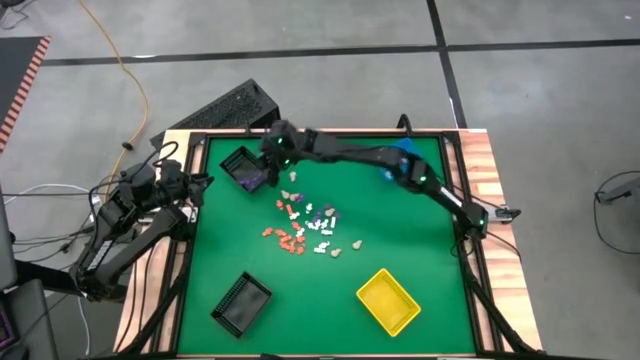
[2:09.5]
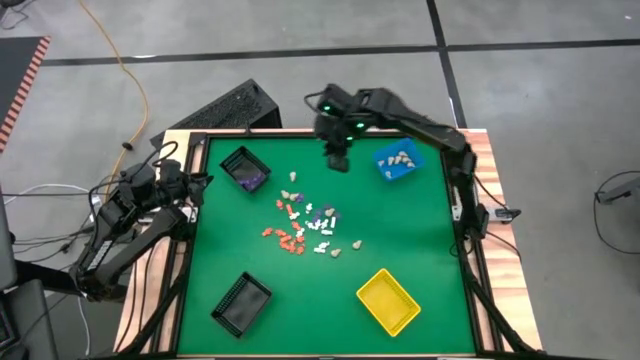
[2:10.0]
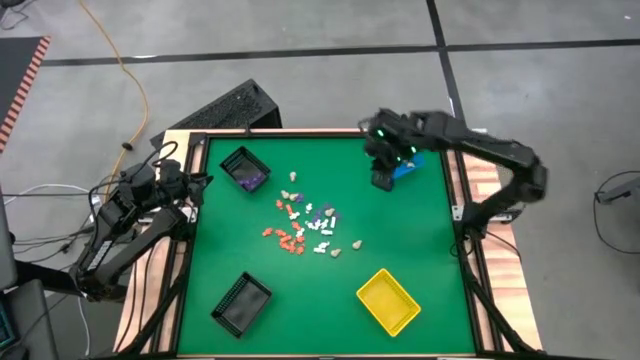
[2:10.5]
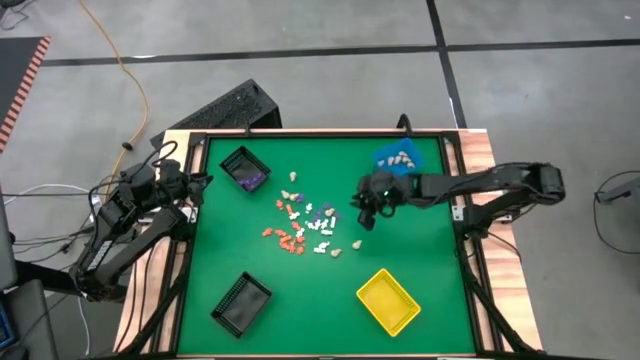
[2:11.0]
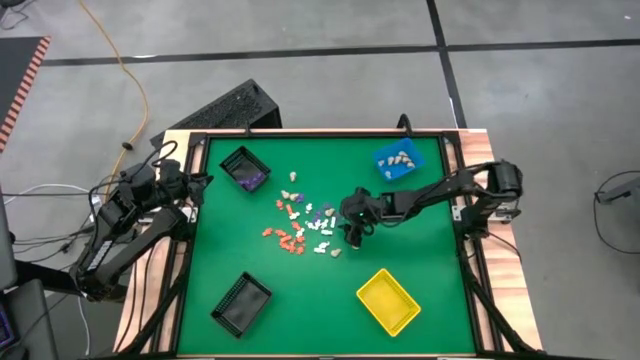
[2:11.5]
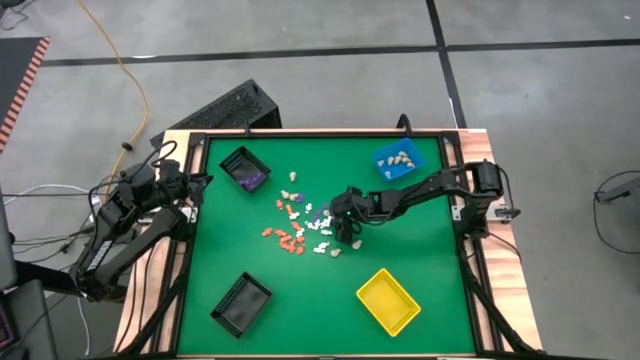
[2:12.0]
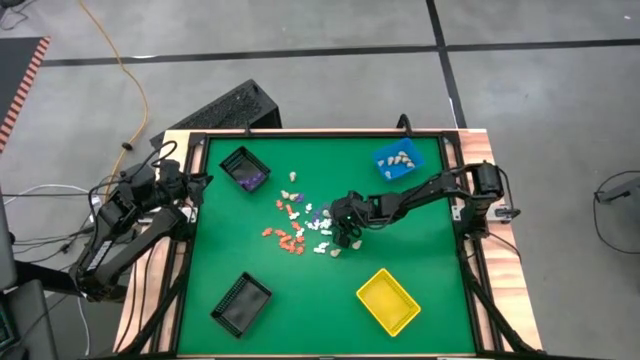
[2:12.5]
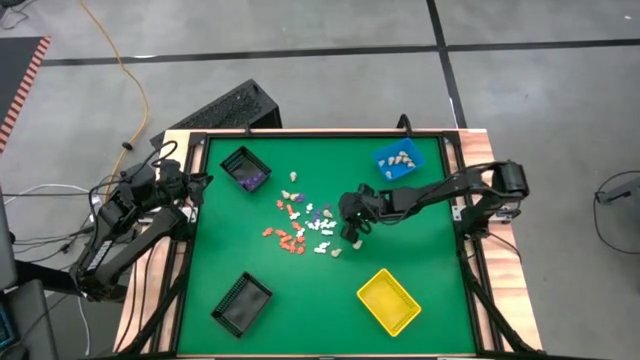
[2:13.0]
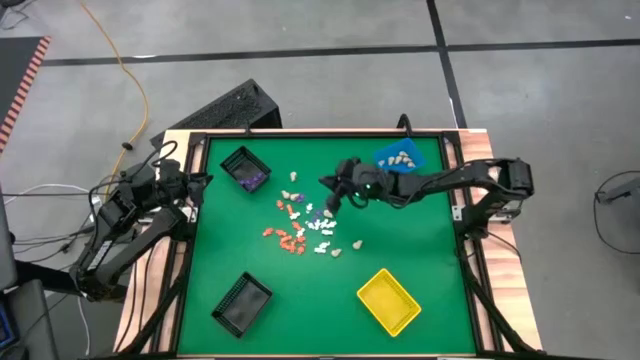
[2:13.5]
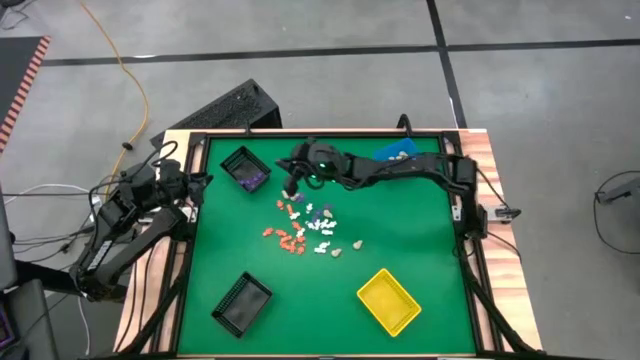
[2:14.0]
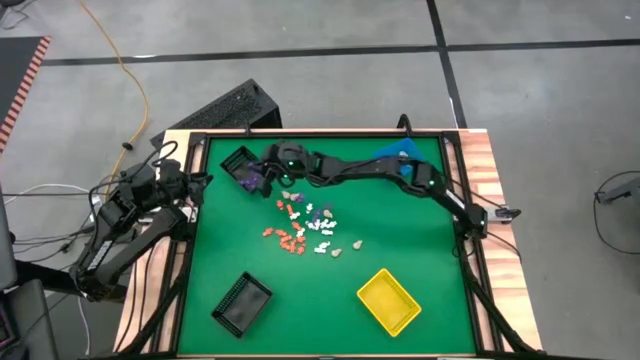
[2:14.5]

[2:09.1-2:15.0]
Task: Sort Halloween decoration
Put the purple spider toy into the top black basket

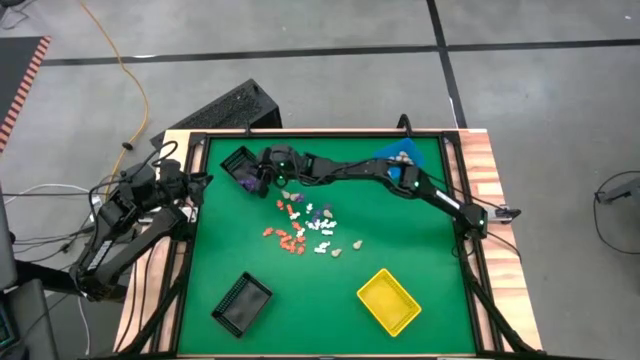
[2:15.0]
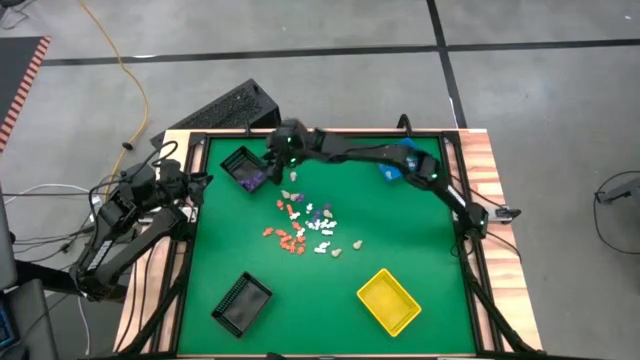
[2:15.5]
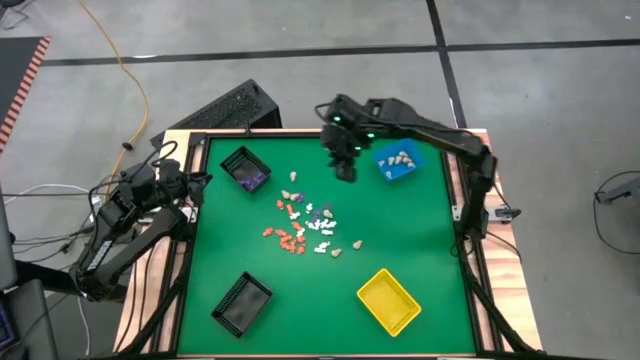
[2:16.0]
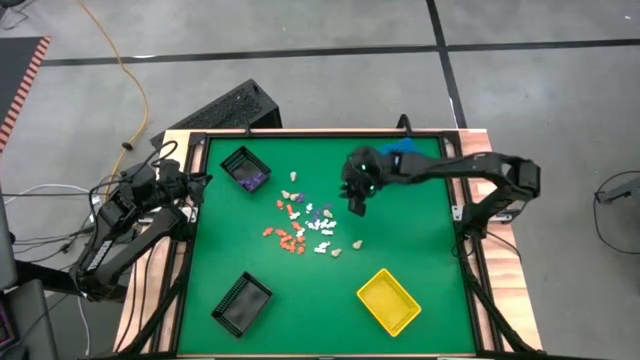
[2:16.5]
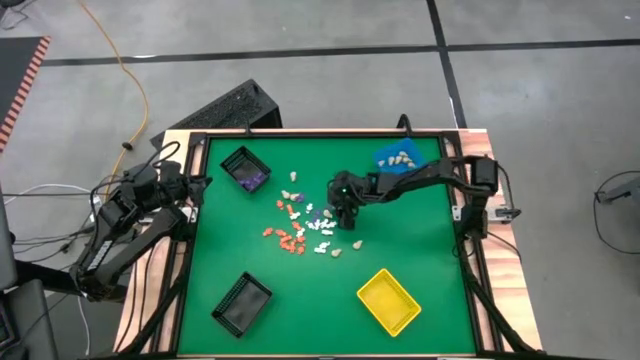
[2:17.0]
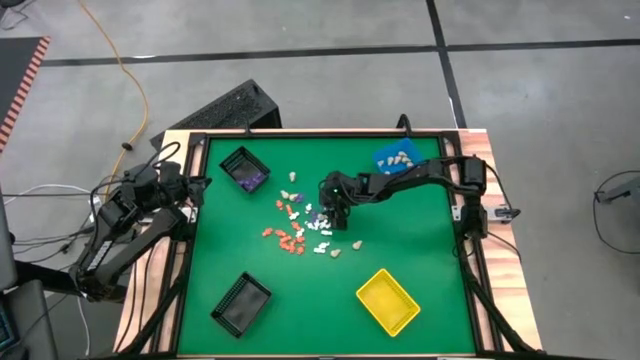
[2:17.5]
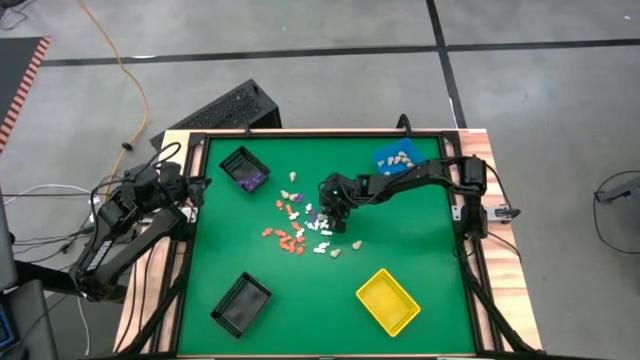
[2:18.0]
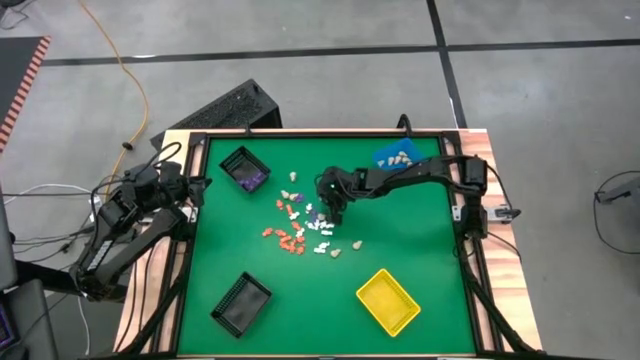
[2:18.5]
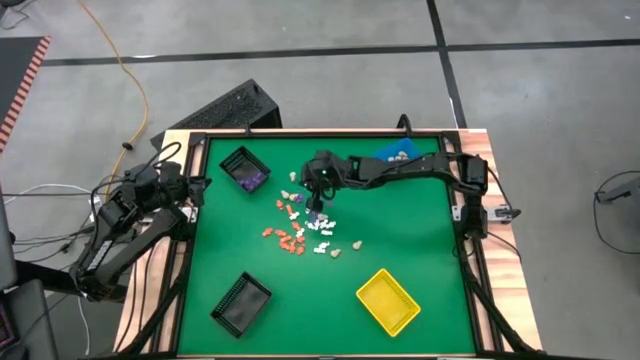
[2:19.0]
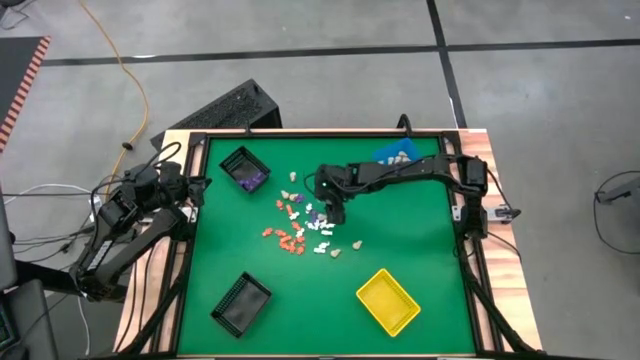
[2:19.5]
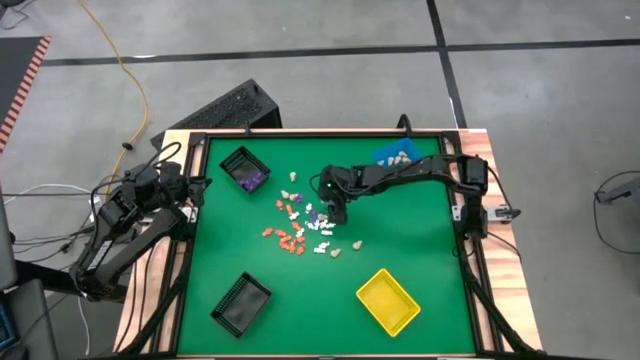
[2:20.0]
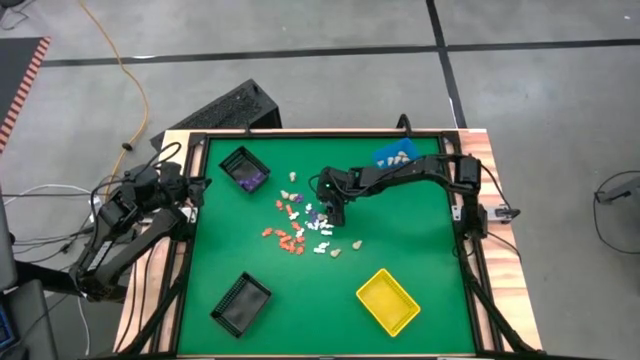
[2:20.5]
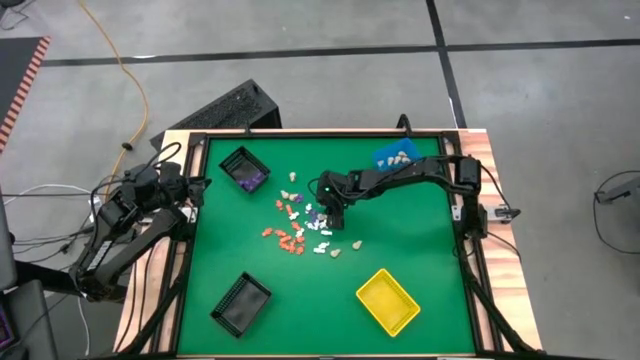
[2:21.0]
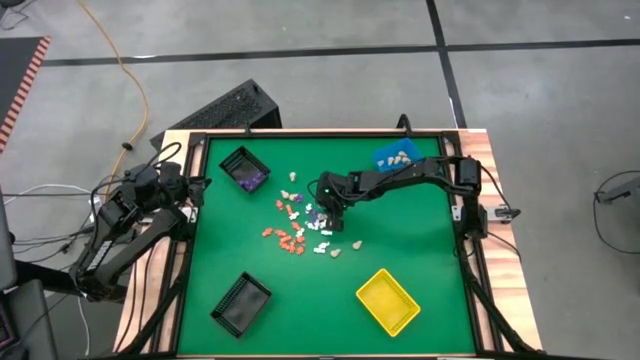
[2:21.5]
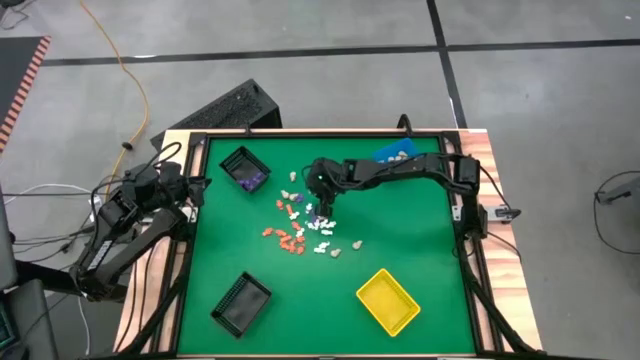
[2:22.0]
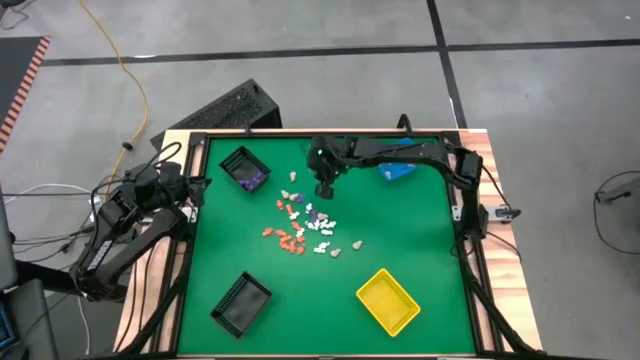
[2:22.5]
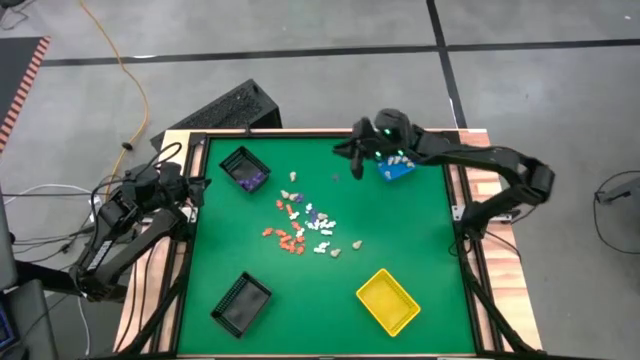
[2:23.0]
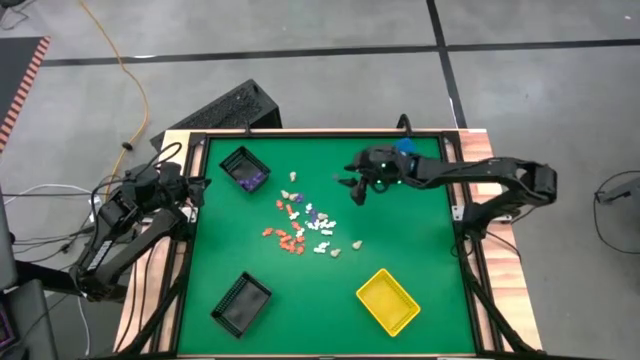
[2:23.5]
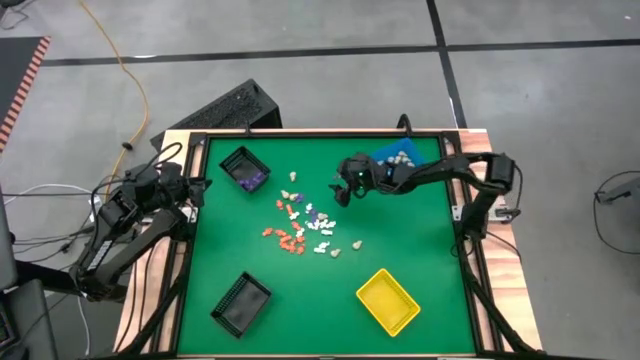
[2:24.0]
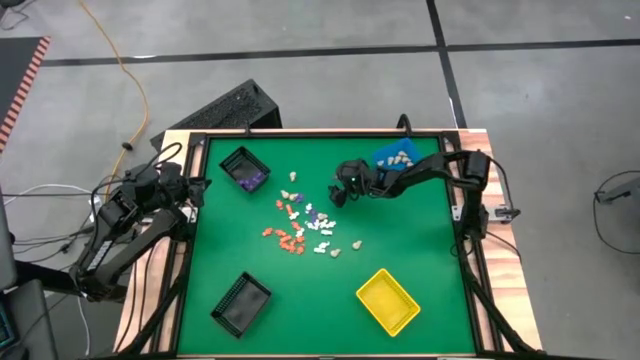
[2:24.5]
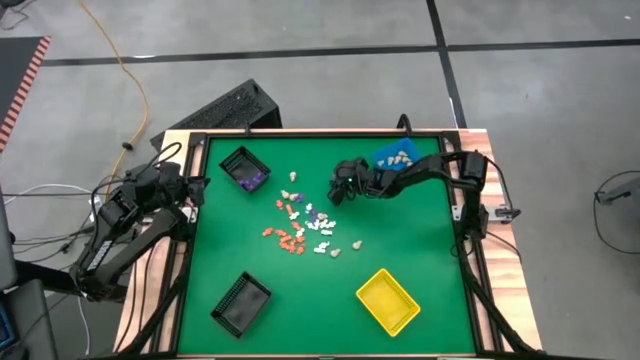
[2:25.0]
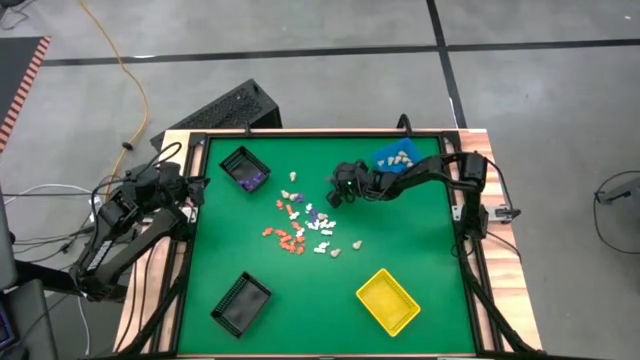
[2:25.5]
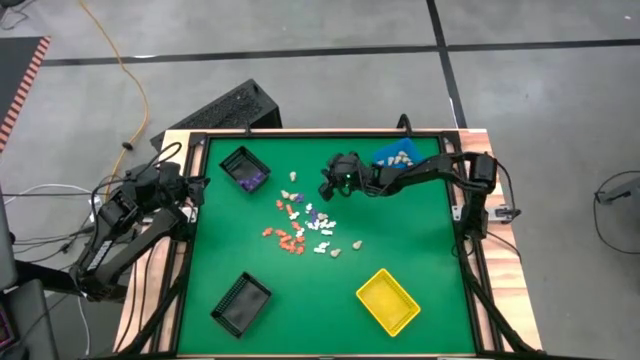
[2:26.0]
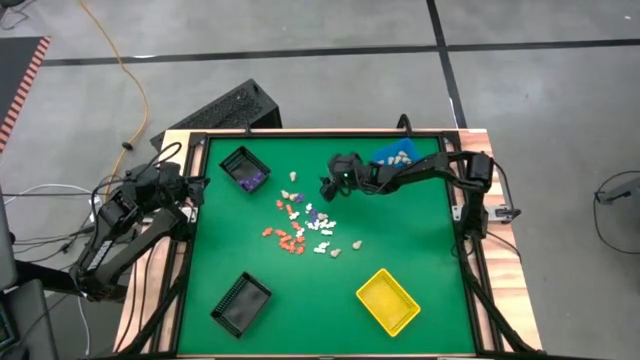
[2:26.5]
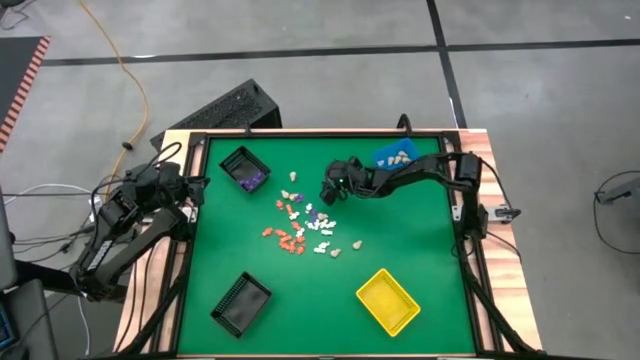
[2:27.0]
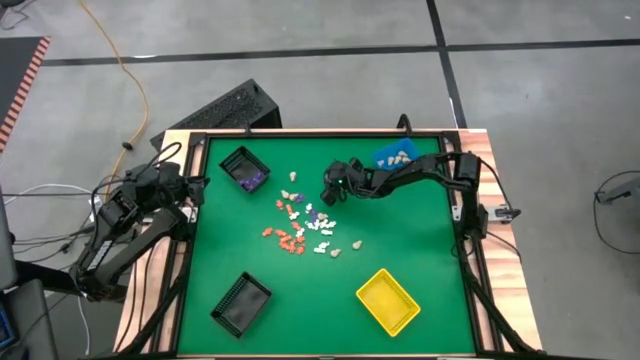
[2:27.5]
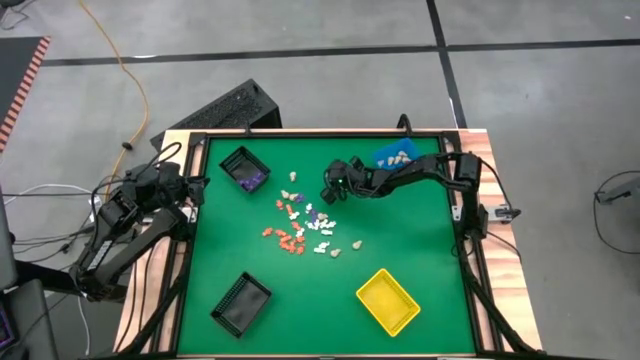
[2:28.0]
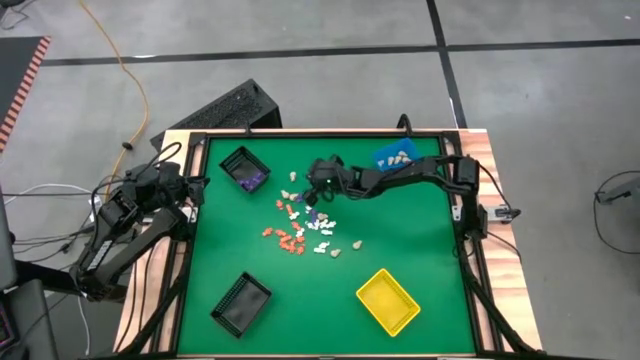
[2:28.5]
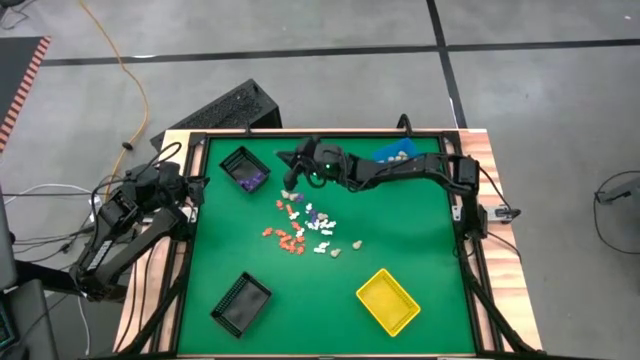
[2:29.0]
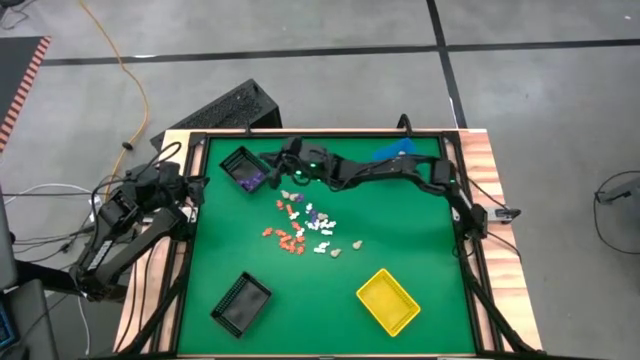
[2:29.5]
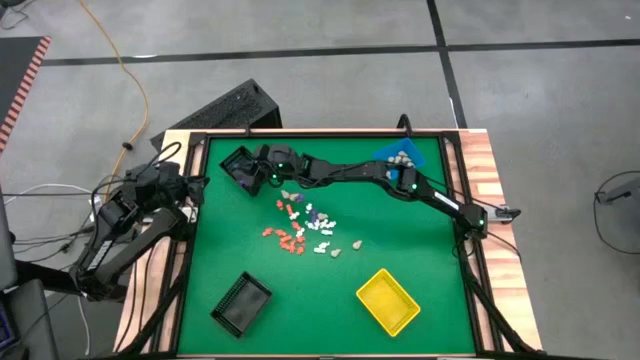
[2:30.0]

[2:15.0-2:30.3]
Put the purple spider toy into the top black basket

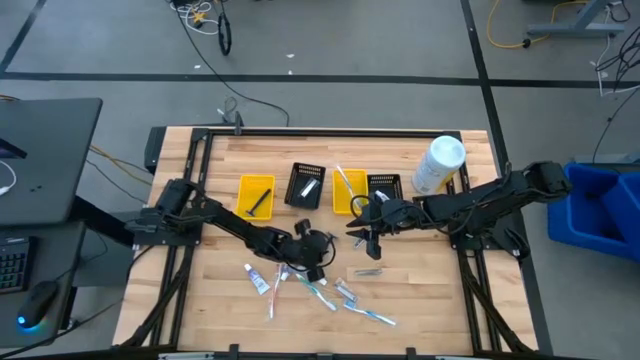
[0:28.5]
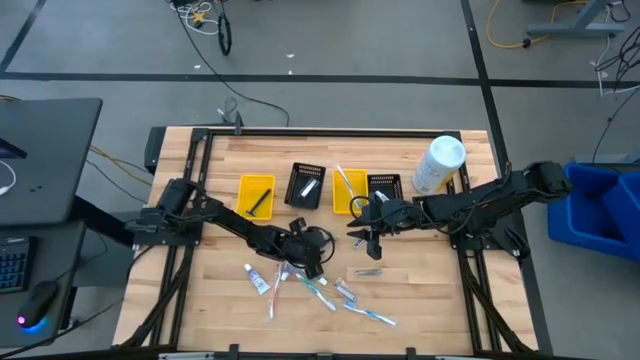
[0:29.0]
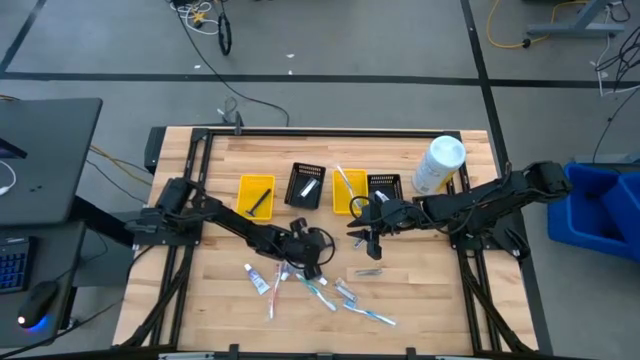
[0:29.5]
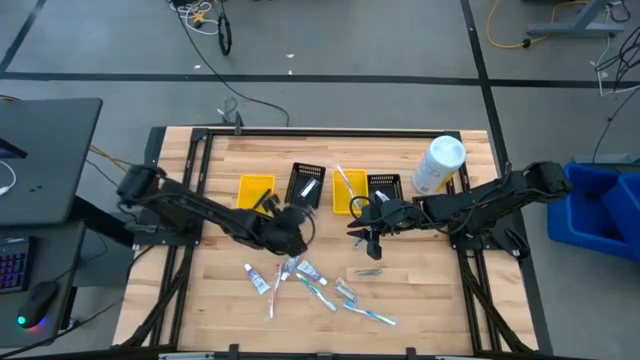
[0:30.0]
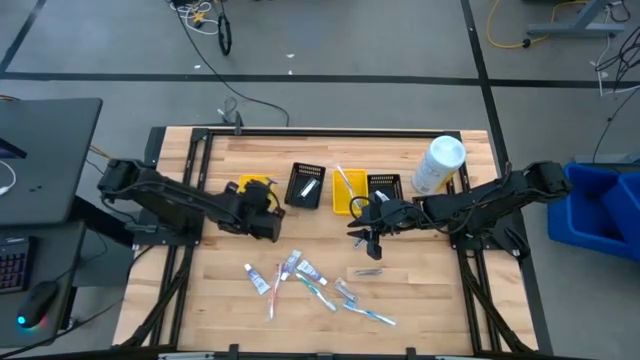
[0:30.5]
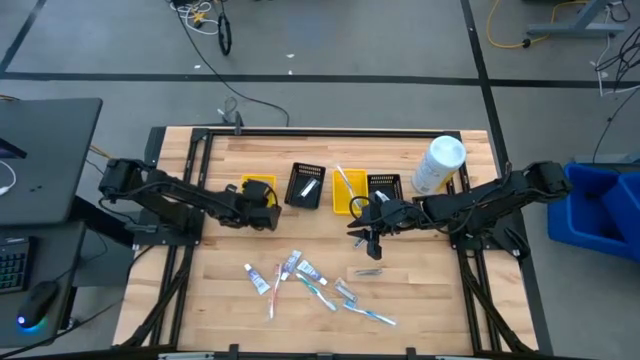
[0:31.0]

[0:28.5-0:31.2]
Task: Pick & Place Travel size toiletries
Put the blue razor into the left yellow bin
